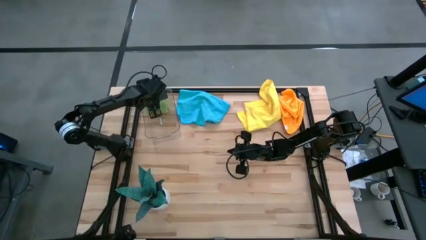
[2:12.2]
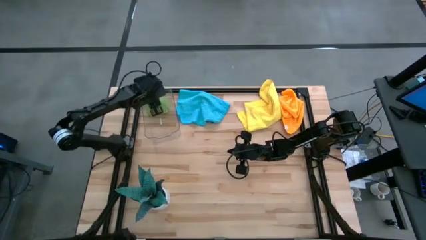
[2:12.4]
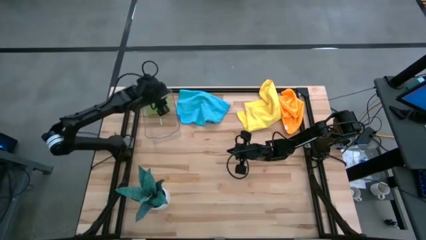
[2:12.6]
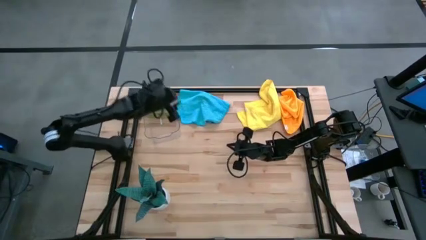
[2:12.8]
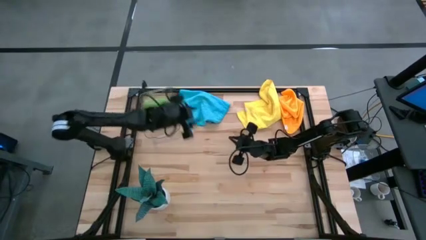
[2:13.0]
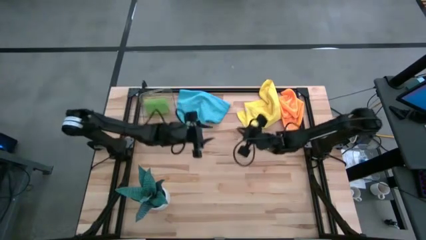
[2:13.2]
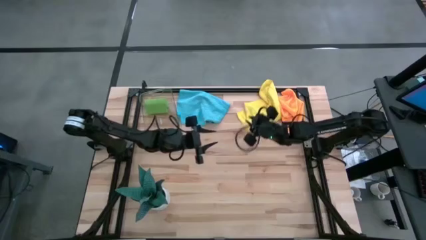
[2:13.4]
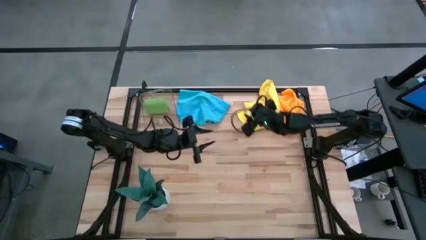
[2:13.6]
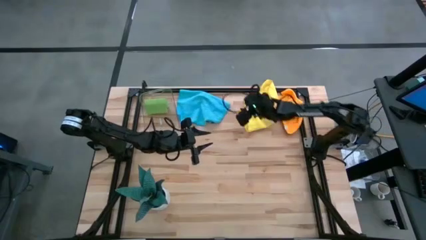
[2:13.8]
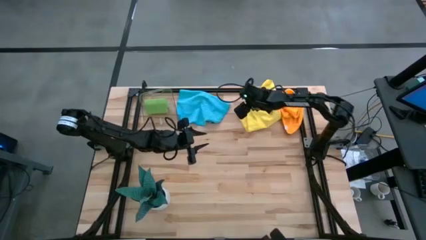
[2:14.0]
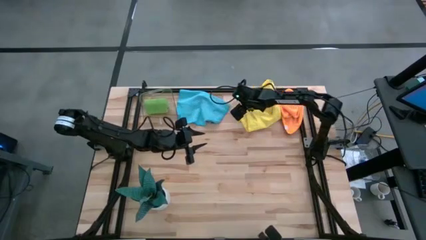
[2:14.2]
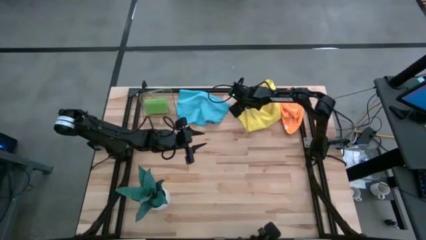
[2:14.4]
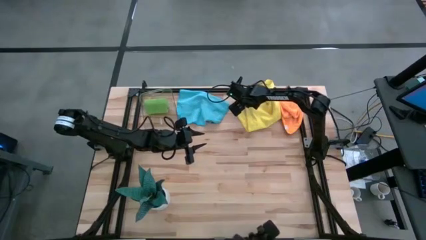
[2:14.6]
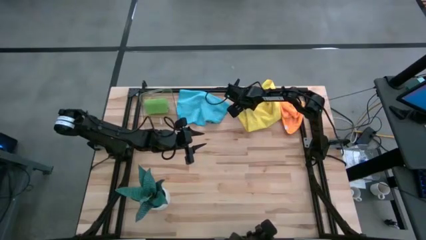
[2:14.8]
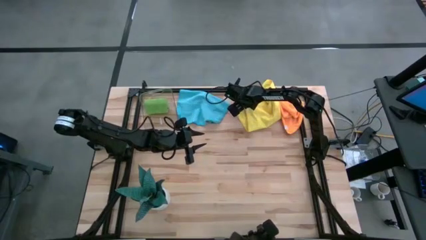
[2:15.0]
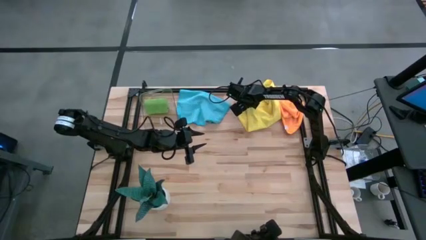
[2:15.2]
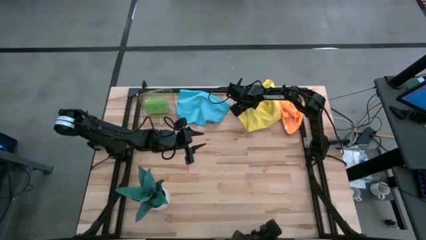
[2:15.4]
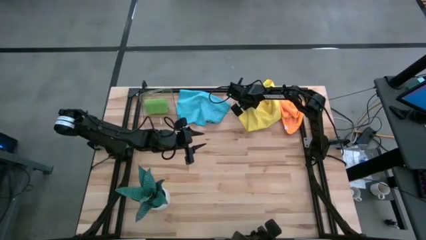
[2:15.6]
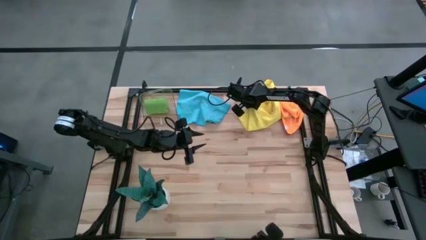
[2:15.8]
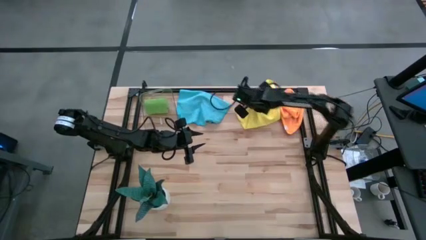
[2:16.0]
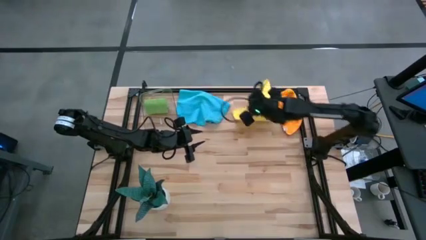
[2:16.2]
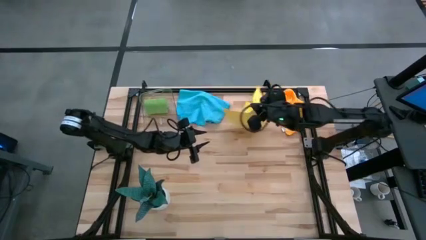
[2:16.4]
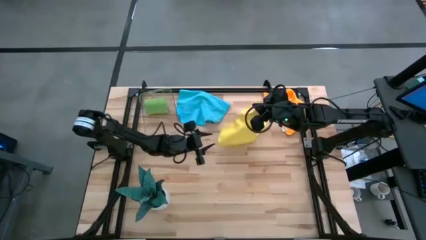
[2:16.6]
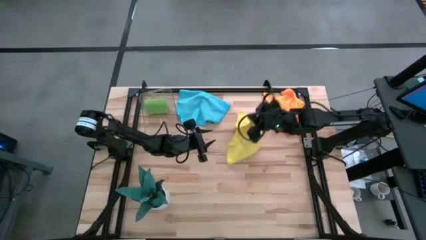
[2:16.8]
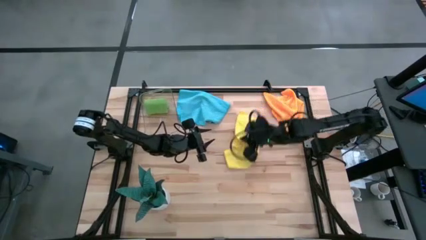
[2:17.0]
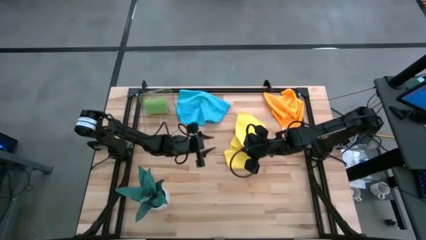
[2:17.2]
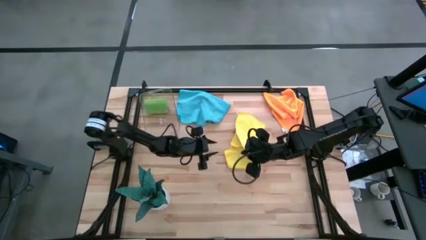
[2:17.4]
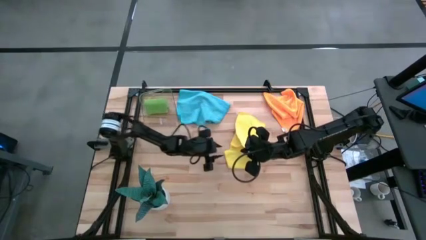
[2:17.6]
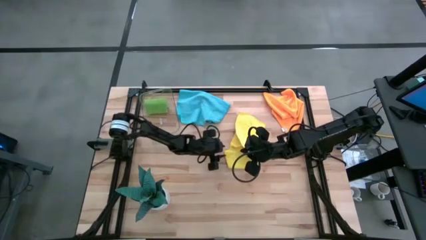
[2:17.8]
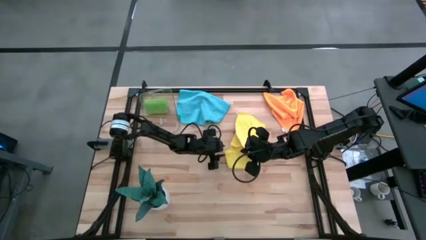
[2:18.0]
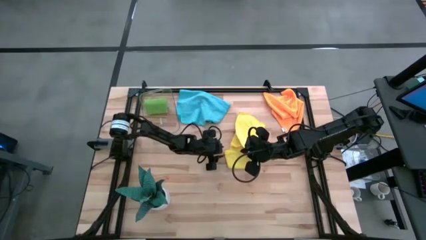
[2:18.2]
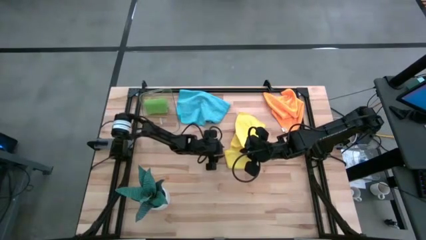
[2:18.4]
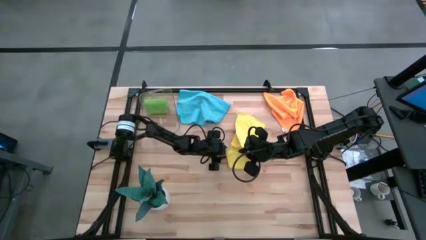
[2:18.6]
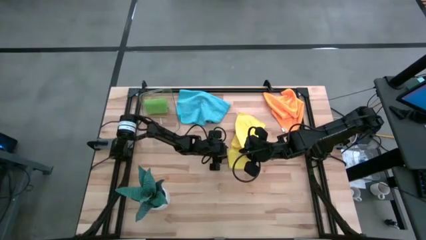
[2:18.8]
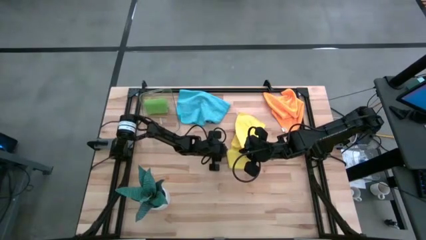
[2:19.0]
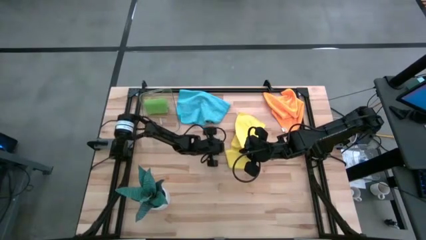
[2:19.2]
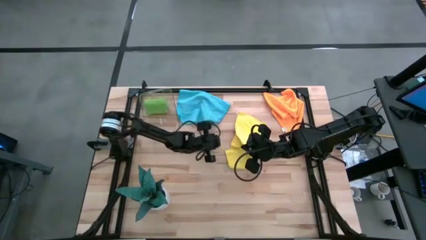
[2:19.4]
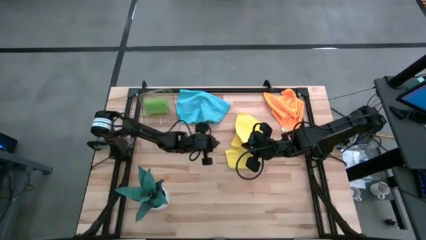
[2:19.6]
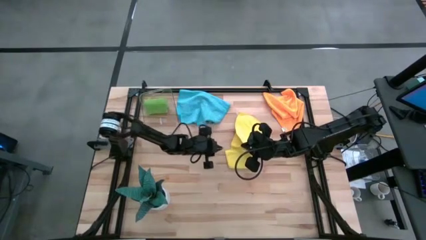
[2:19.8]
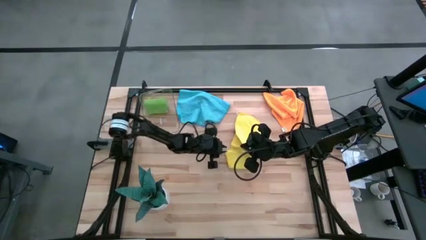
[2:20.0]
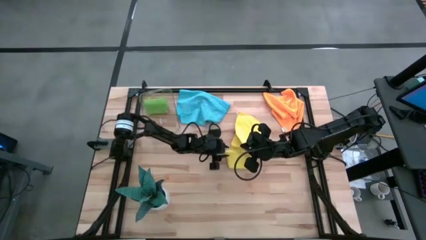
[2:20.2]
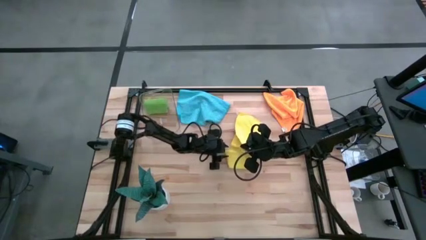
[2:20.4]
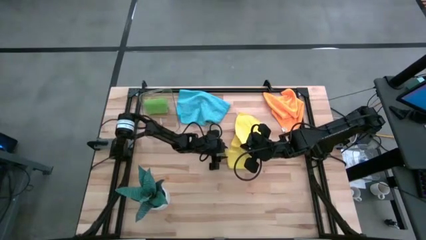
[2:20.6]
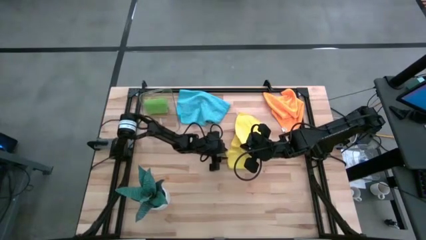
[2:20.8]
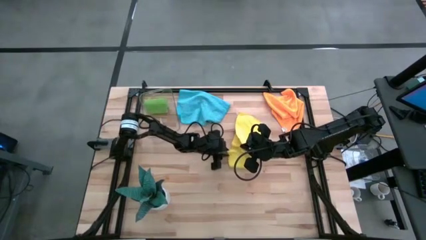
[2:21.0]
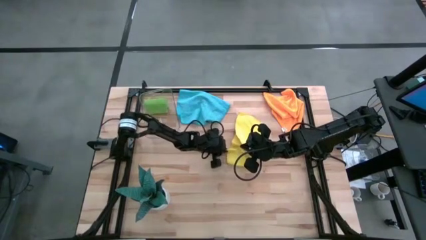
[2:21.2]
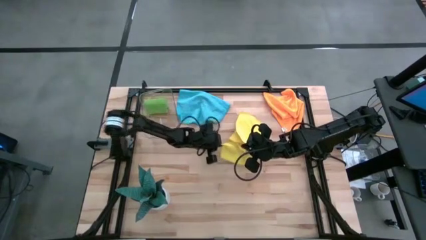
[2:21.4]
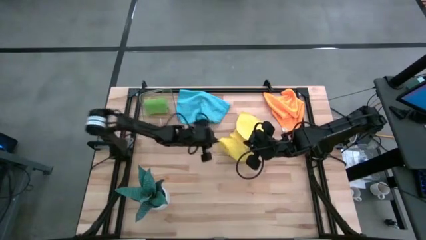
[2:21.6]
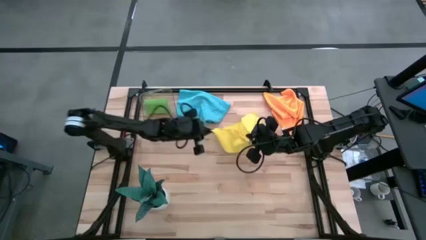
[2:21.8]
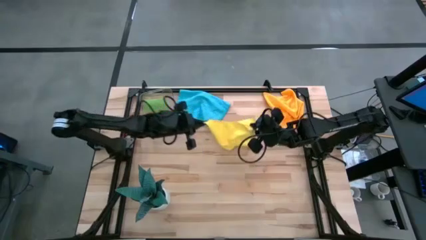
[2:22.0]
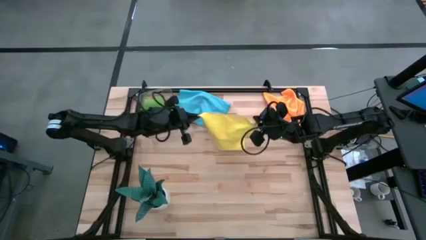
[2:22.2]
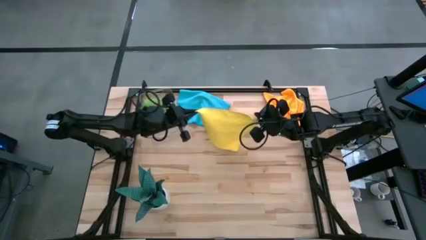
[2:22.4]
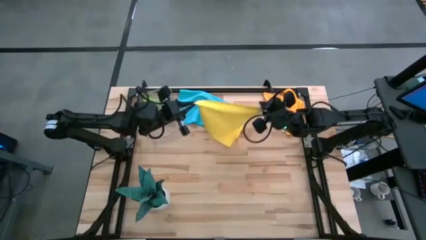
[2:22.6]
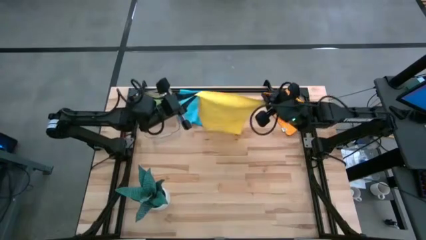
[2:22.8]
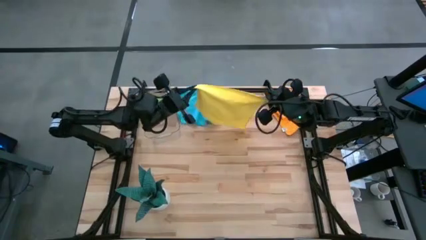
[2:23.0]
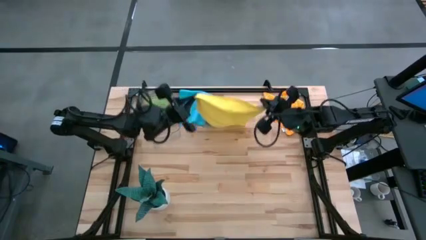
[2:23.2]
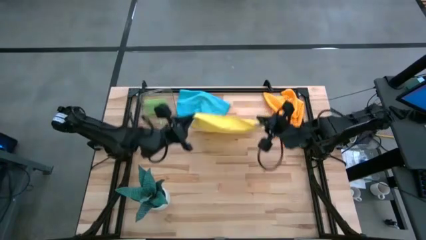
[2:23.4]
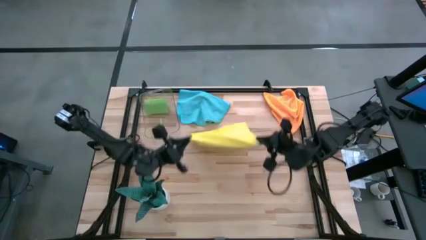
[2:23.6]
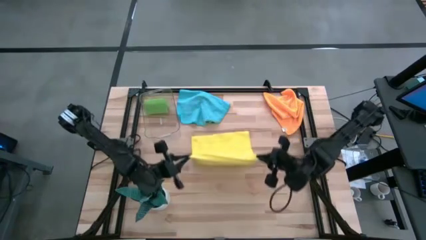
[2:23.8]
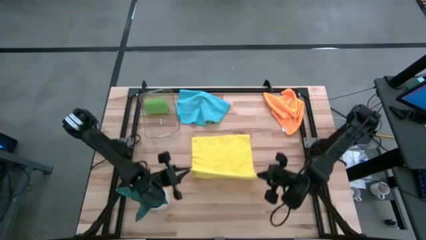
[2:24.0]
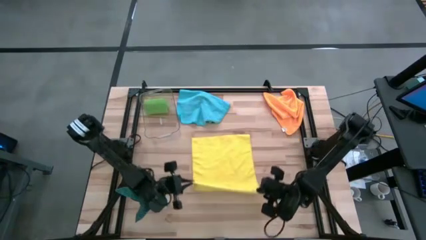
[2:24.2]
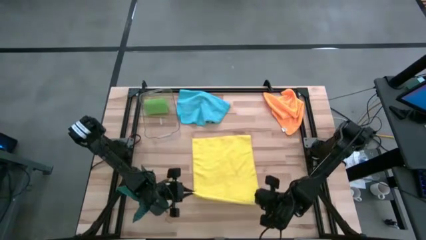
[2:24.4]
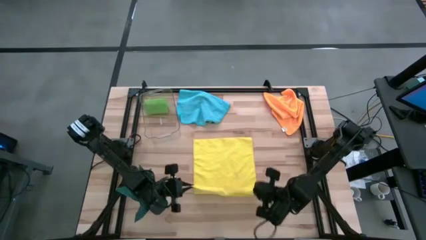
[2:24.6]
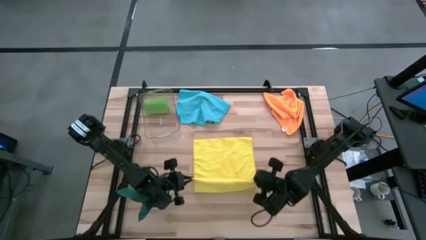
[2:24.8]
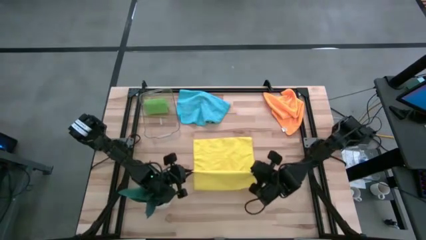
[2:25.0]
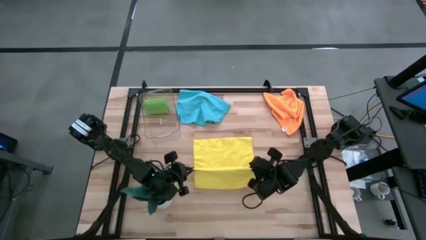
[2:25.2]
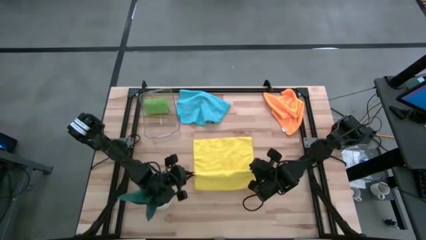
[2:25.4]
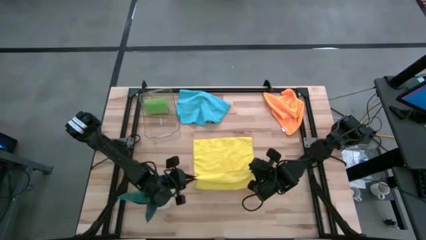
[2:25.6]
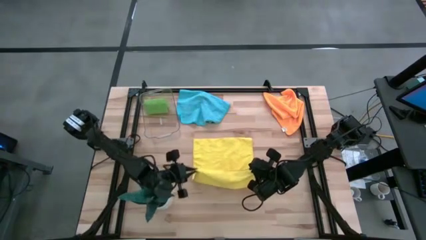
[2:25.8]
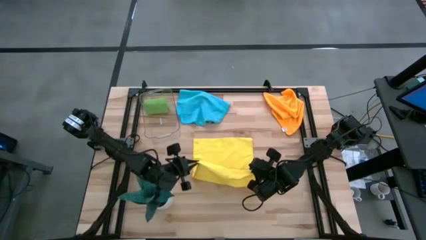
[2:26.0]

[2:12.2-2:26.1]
Task: Roll microfiber towels into tight, uniform cylinder then place into a basket
Fold the yellow microfiber towel

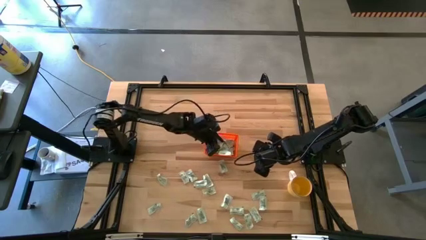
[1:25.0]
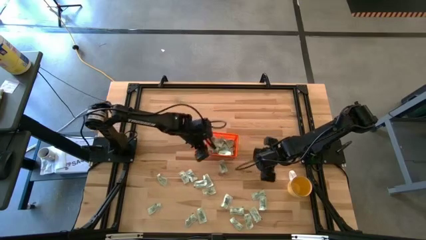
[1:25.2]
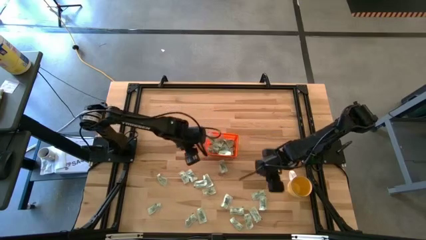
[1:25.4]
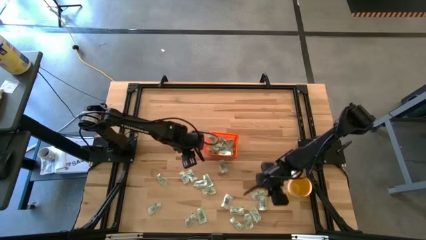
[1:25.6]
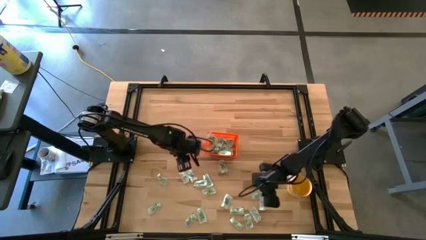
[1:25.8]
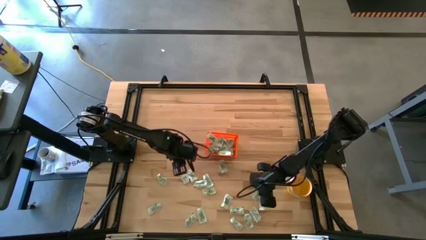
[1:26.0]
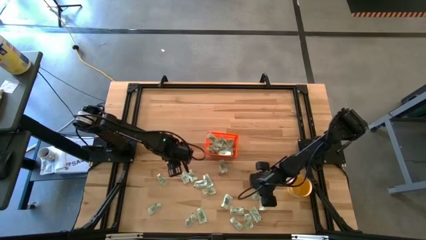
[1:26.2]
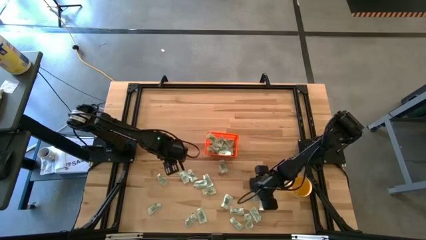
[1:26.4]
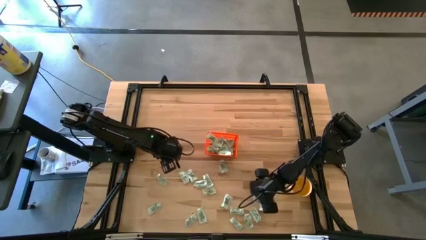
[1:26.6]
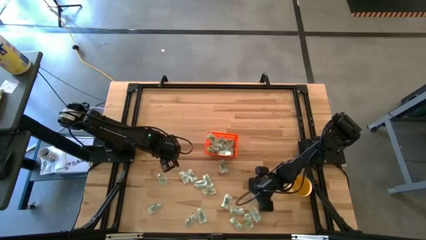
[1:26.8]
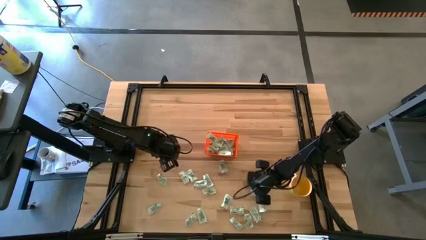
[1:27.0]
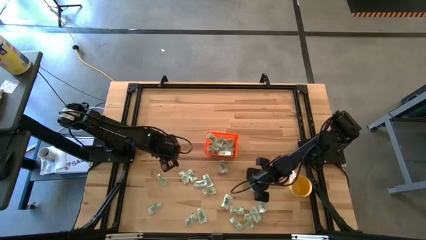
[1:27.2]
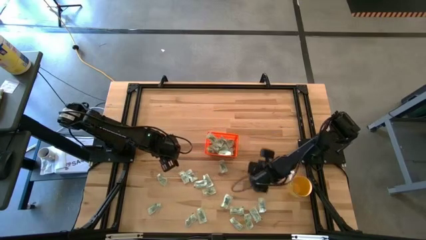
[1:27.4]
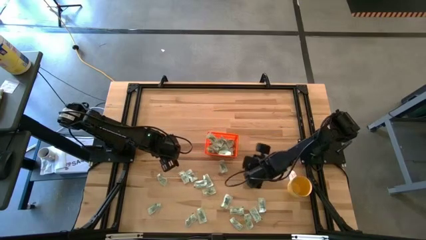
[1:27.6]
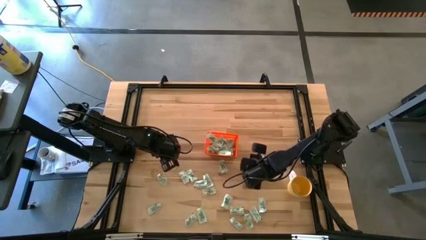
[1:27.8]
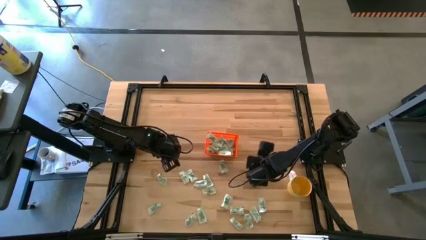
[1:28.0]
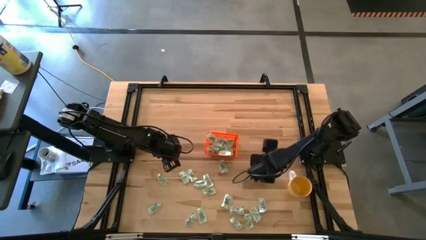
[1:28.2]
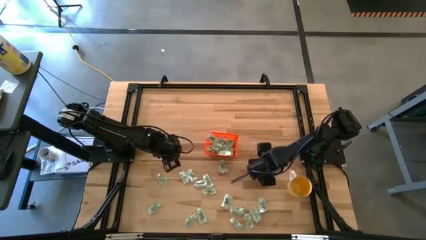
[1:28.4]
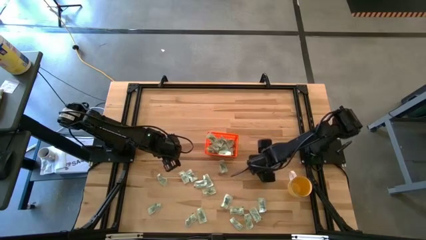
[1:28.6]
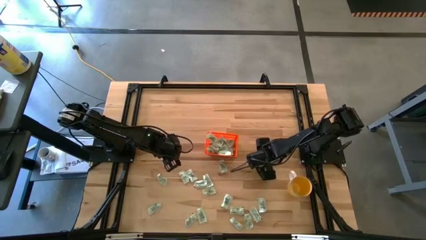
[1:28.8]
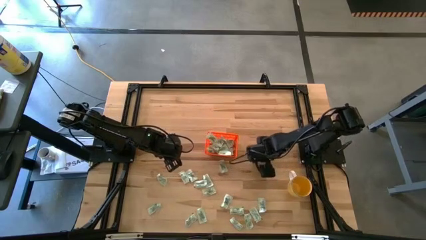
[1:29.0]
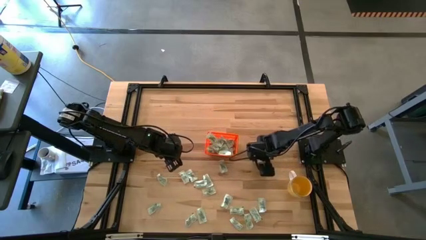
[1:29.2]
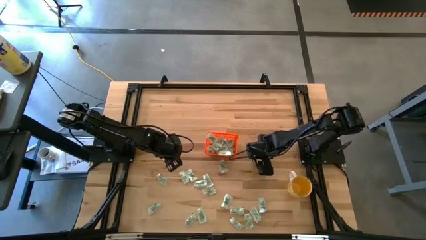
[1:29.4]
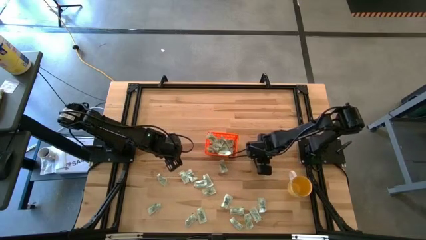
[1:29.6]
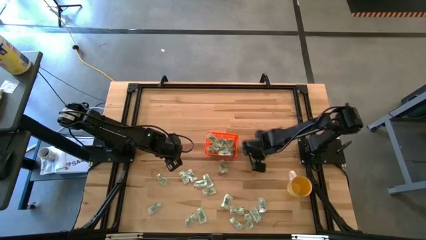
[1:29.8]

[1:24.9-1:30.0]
Task: Pick and place Stevia / Truvia into bins
Put the light green stevia packet into the orange bin
